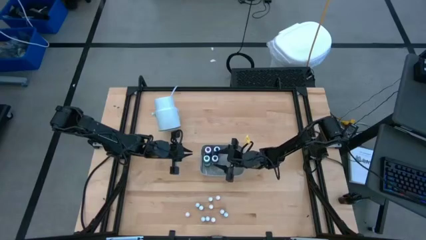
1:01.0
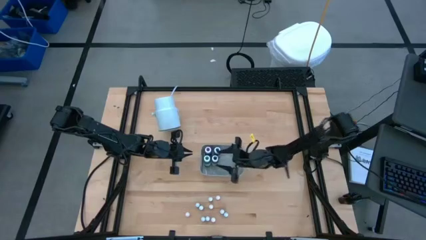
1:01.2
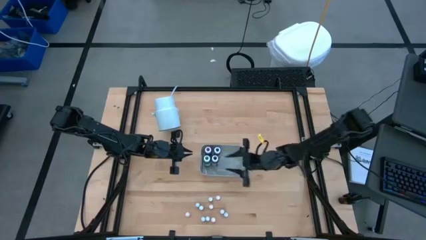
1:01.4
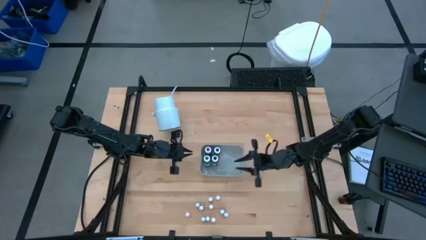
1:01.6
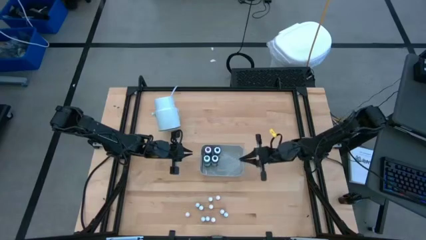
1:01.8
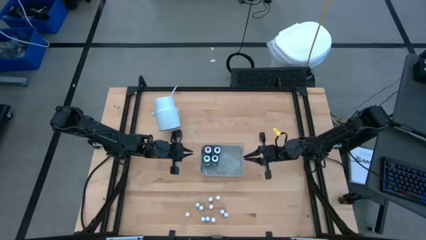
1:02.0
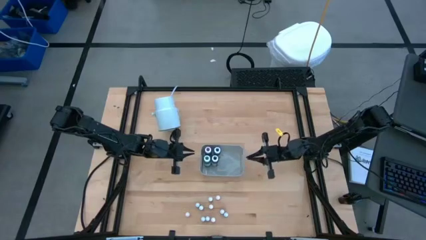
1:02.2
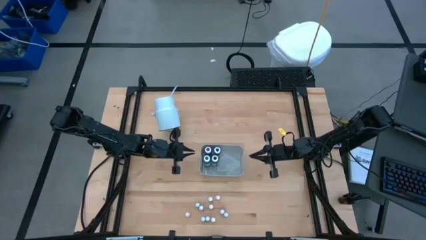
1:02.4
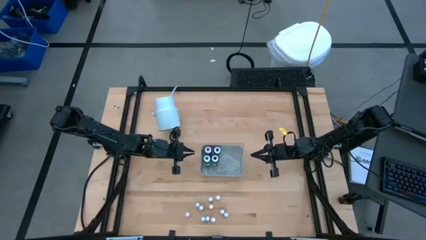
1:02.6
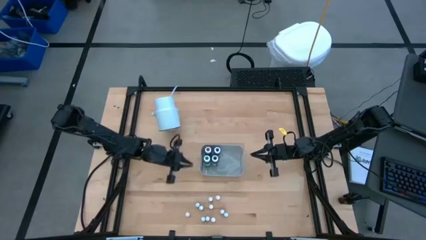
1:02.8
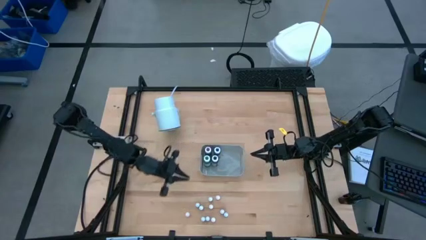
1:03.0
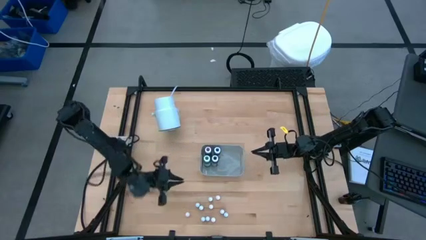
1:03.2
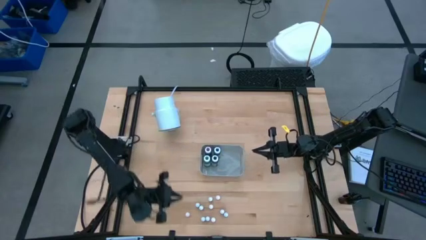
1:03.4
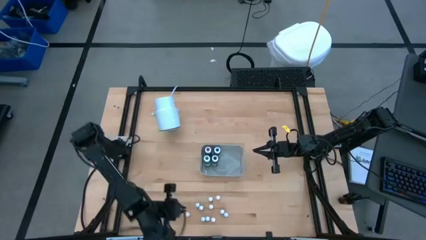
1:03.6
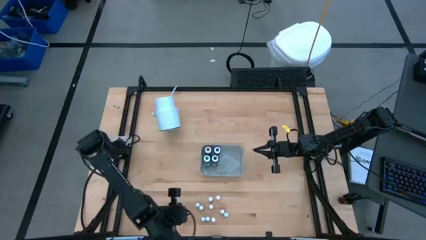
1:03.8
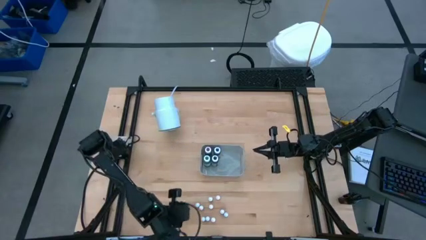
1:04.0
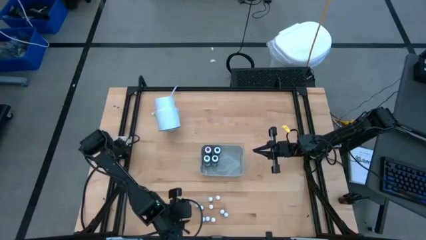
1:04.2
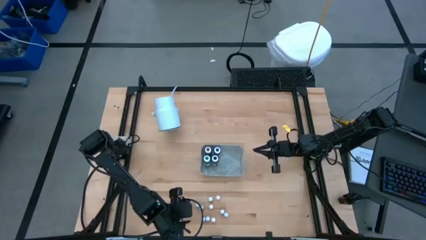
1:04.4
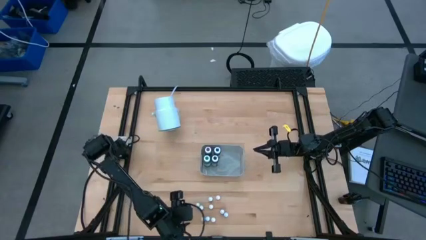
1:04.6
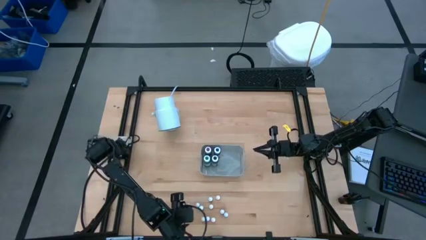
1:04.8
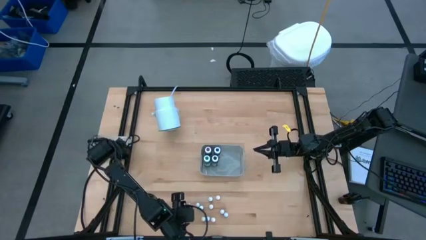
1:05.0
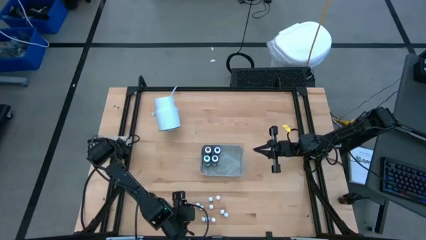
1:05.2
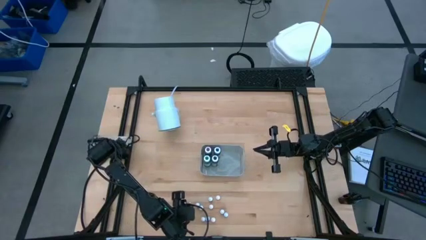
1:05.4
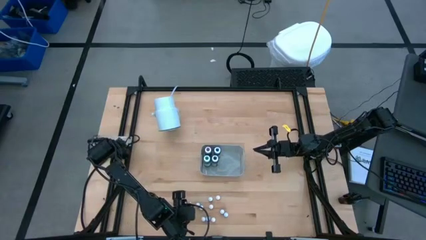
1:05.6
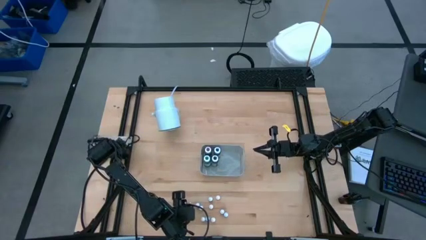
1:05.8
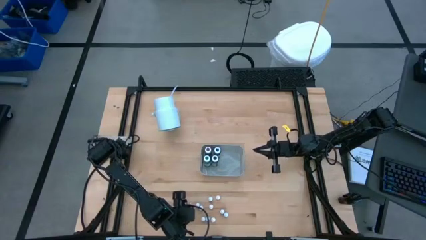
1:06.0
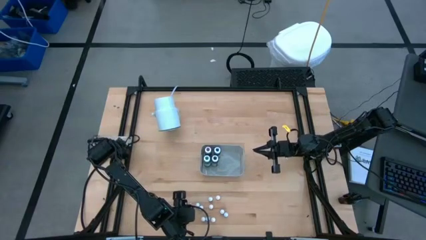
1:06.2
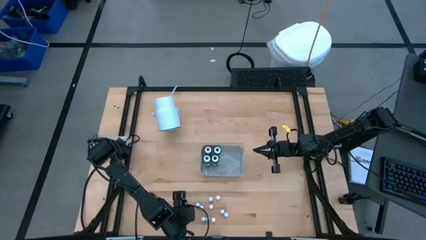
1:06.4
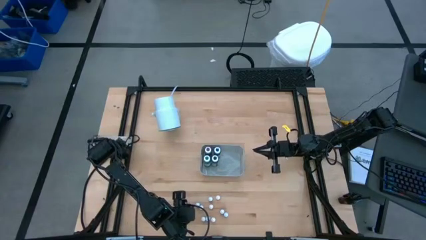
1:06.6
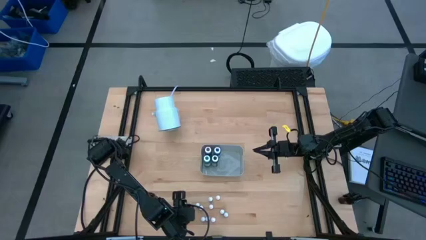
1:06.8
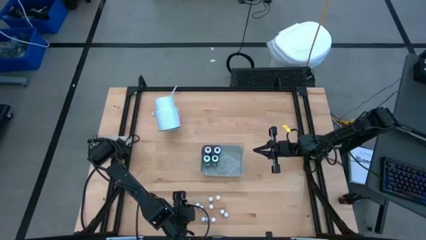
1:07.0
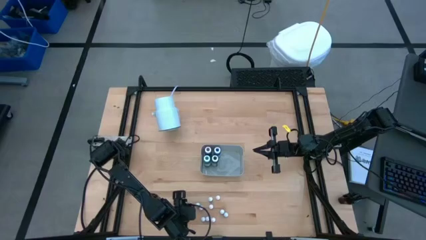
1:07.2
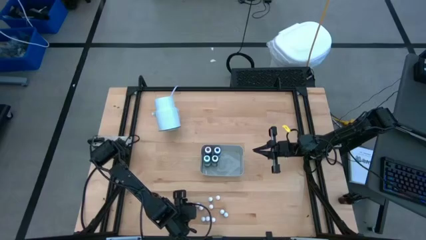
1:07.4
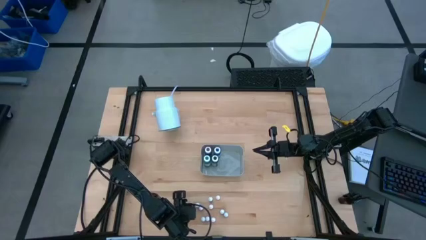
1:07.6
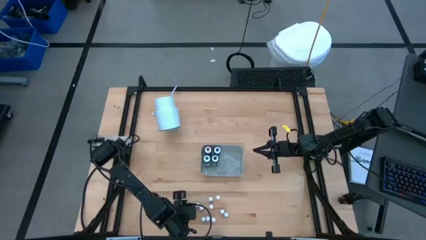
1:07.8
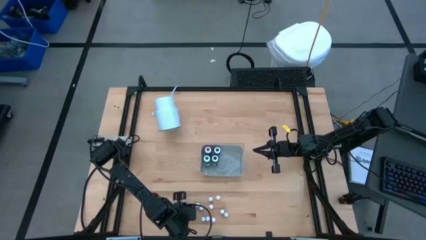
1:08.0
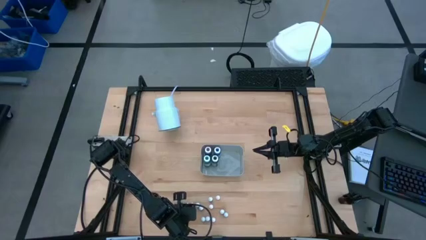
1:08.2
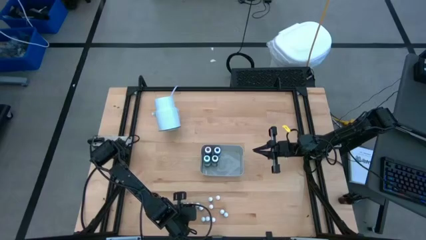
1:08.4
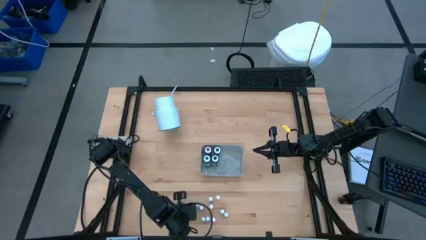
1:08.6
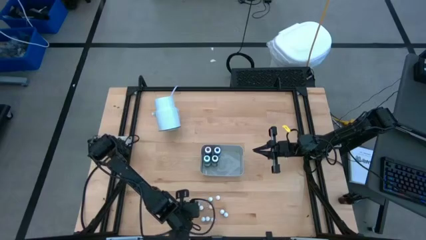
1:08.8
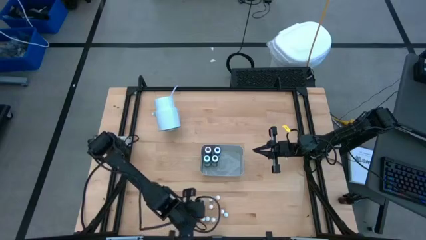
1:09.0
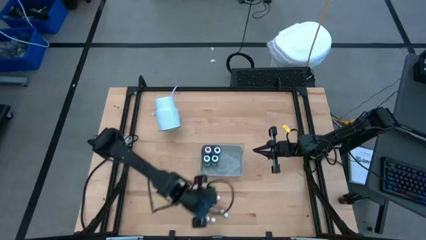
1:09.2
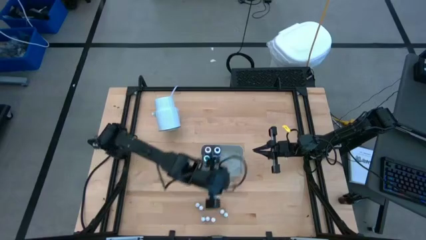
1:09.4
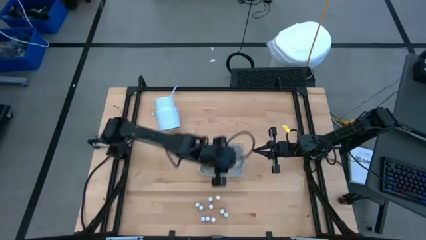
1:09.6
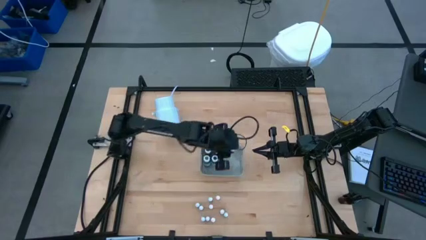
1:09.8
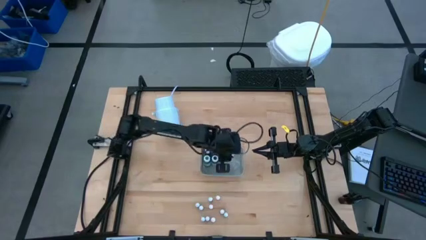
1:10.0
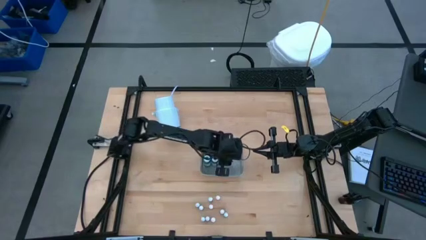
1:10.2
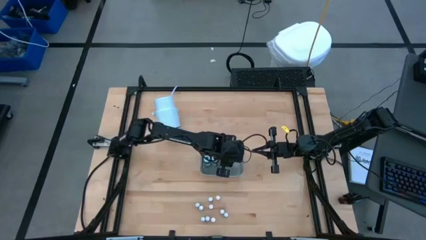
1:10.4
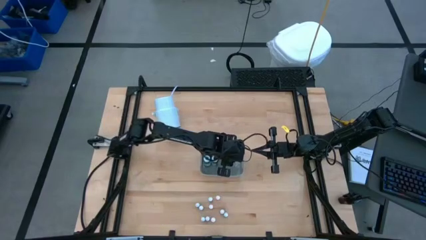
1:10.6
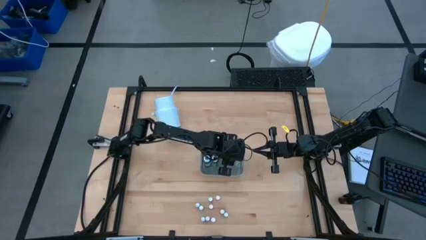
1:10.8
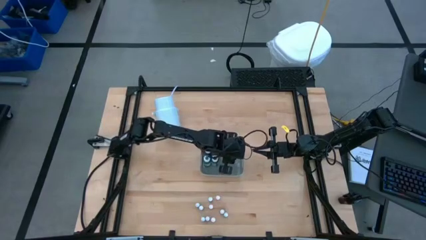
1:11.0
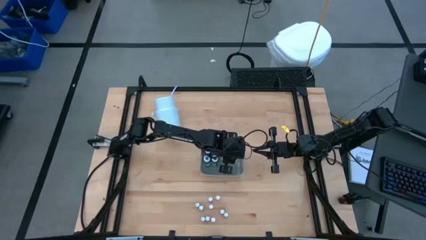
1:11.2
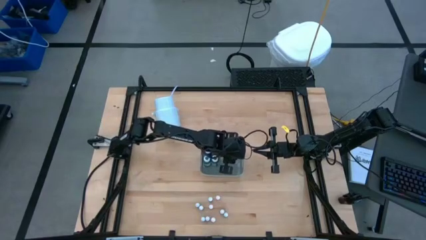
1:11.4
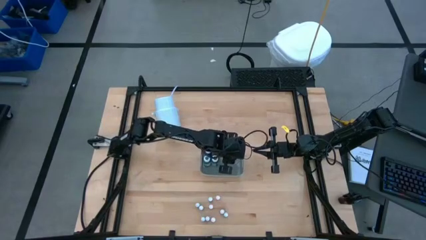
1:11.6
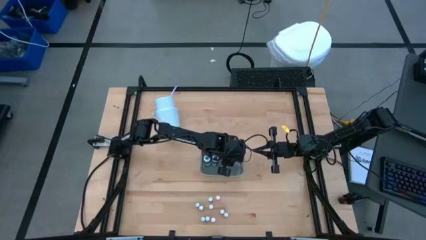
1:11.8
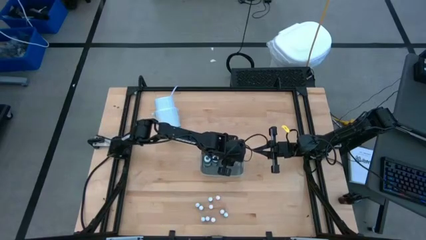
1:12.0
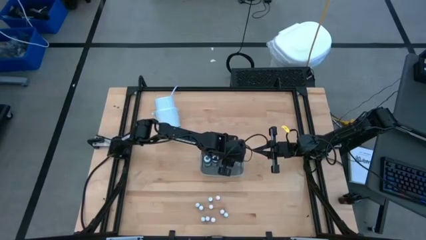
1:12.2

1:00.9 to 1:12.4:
Task: Pick & Place food coloring
Put the small orange food coloring bottle into the bin

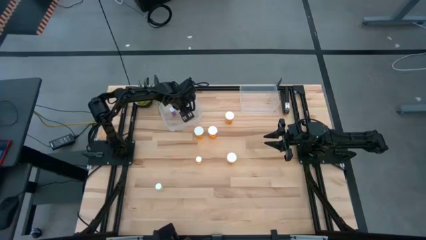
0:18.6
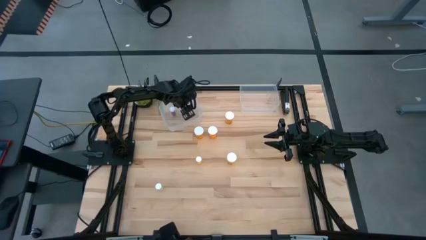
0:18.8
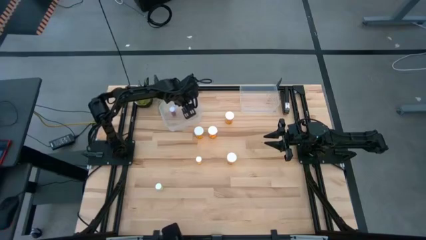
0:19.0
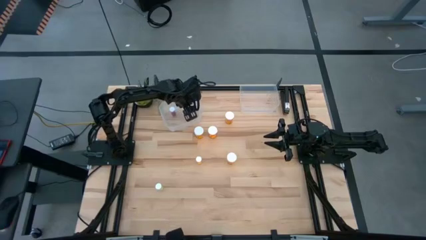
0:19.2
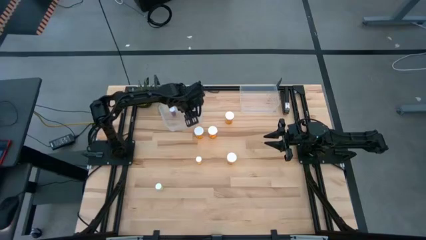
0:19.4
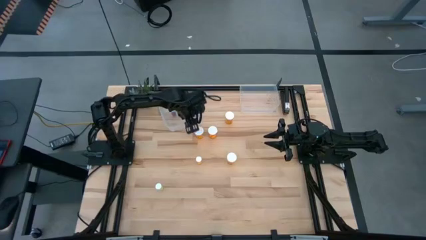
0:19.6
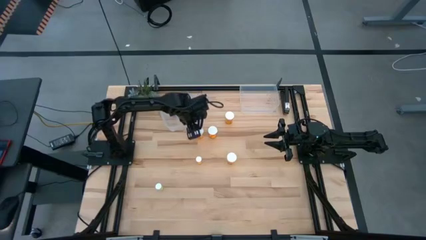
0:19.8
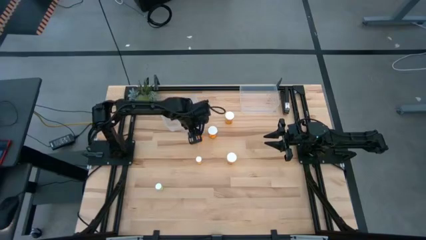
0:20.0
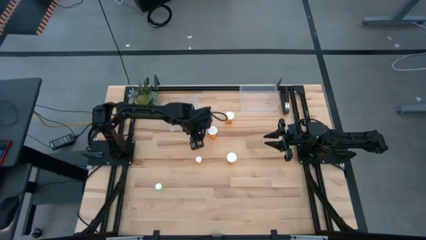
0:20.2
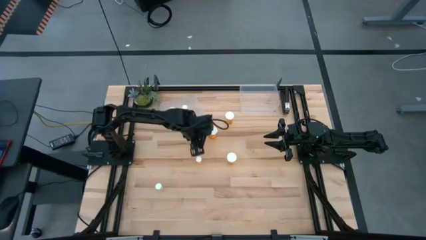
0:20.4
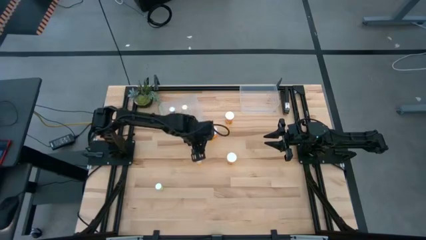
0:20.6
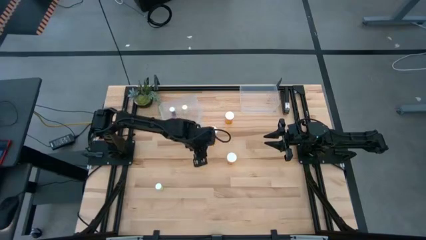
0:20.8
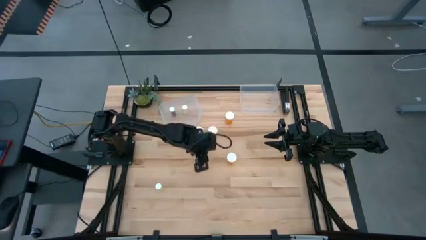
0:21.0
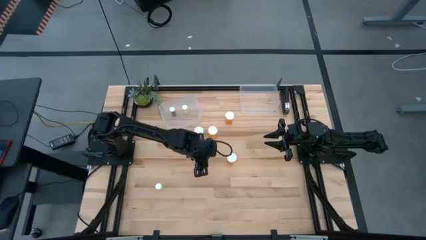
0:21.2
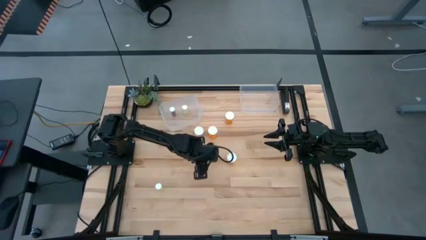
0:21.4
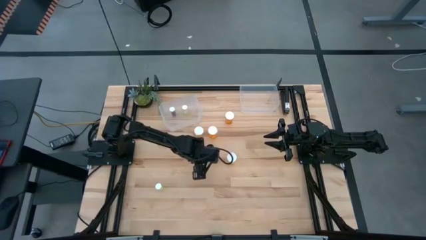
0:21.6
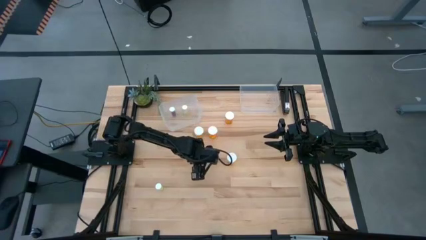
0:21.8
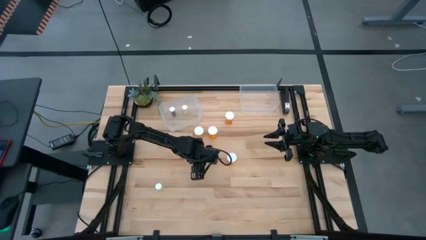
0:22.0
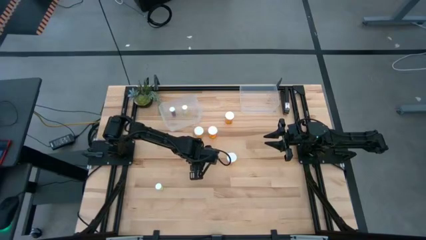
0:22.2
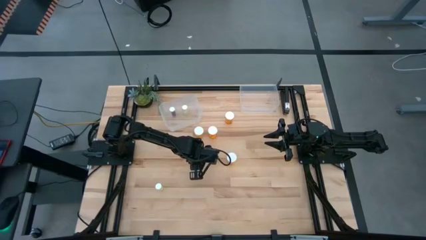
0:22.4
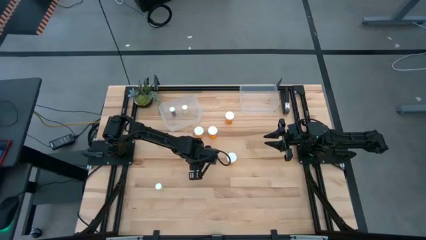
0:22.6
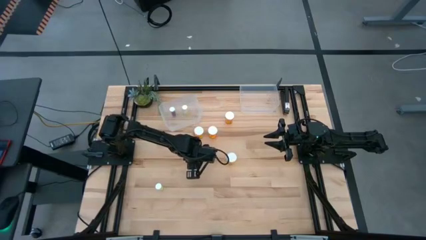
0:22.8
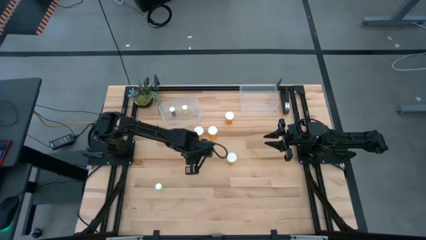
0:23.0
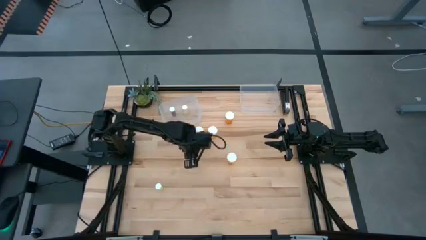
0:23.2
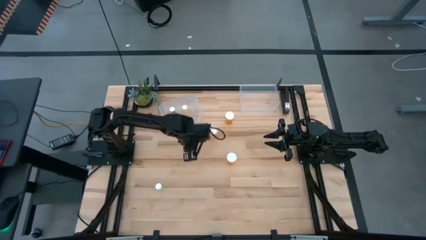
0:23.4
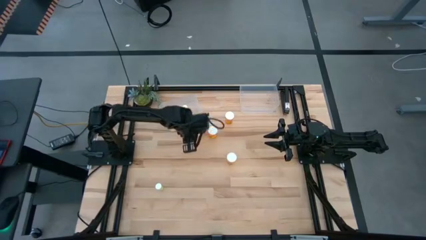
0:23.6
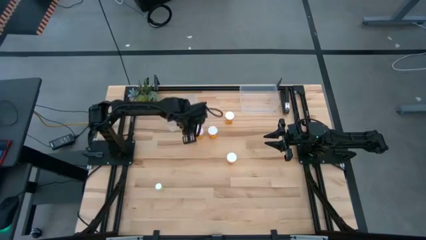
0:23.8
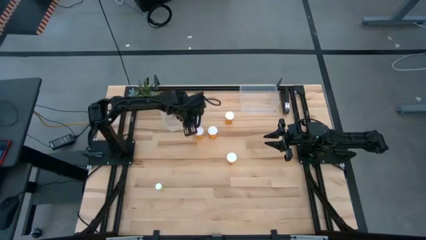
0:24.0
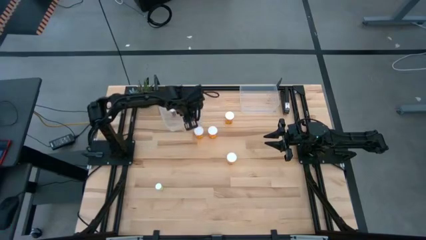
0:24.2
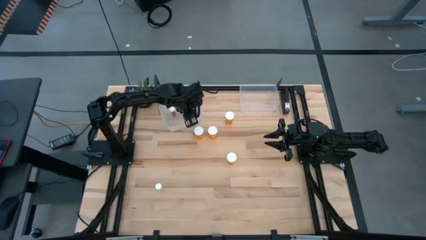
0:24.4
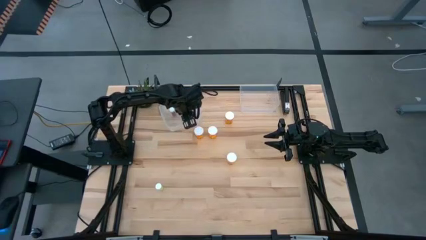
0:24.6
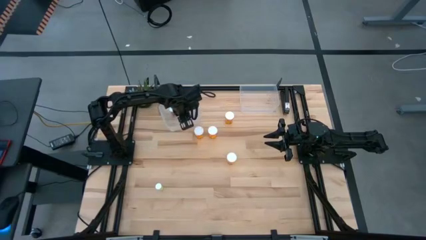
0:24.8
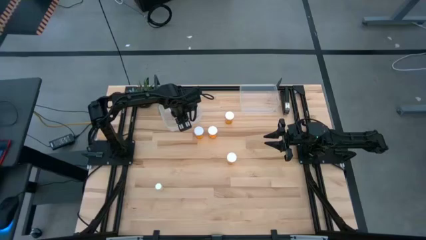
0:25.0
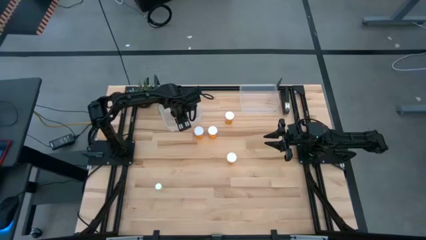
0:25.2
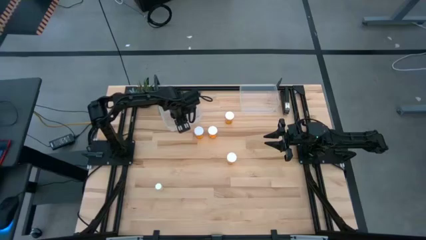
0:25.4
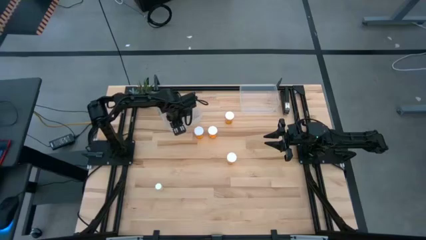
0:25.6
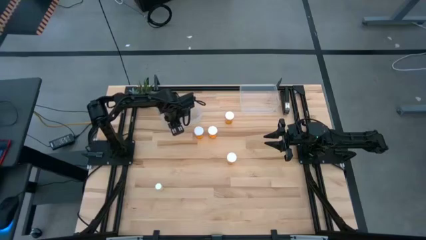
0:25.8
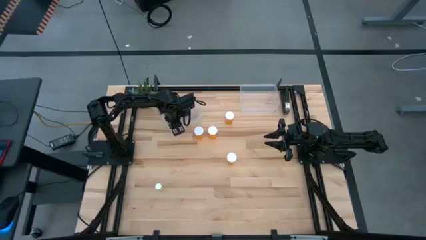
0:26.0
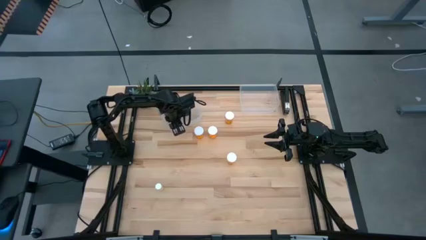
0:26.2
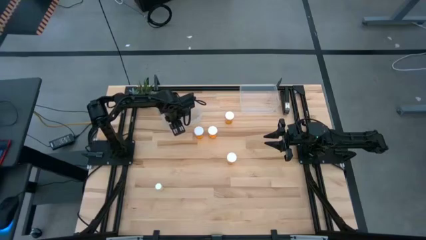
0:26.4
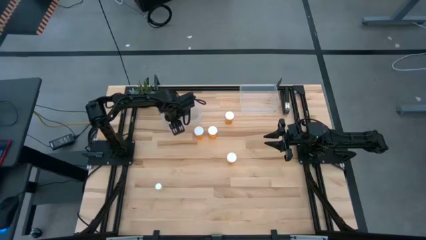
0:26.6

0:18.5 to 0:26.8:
Task: Pick and place medicine bottles into bin by pill shape (circle, oval)
Put the orange small pill bottle into the left transparent bin
